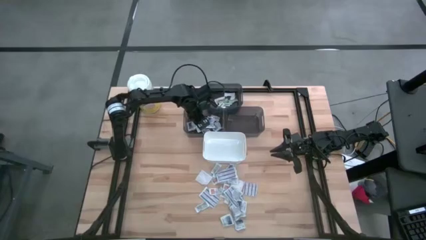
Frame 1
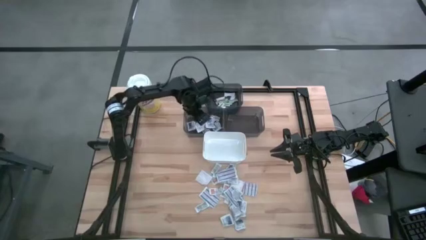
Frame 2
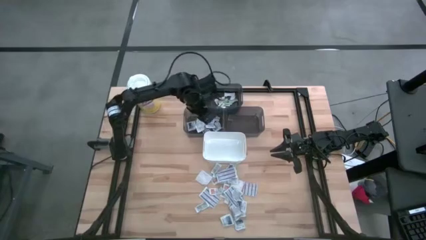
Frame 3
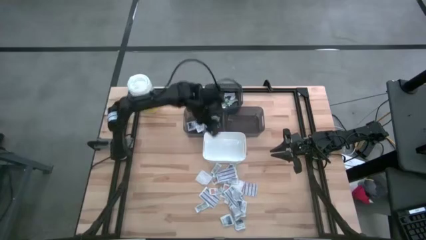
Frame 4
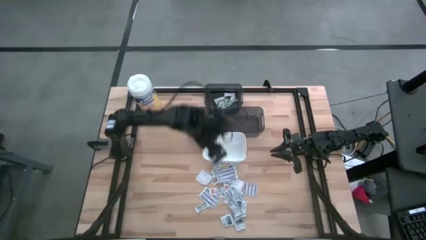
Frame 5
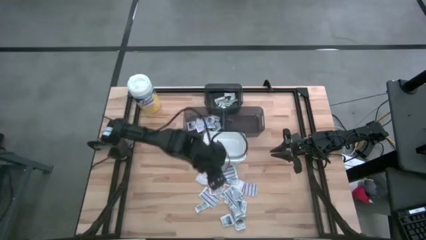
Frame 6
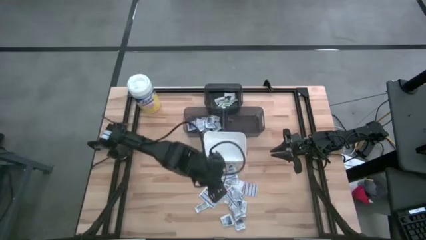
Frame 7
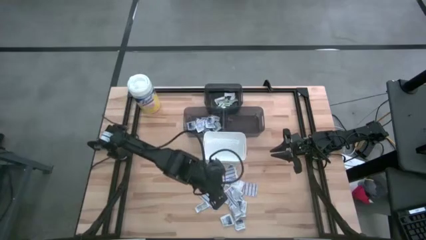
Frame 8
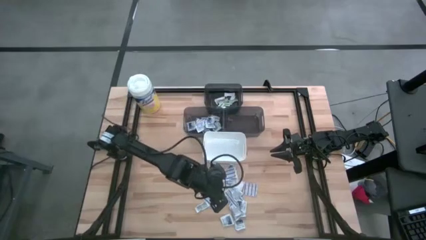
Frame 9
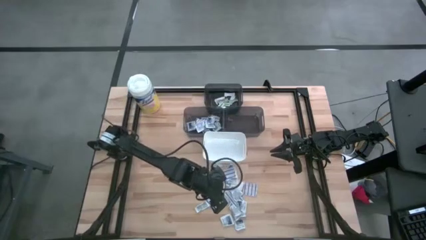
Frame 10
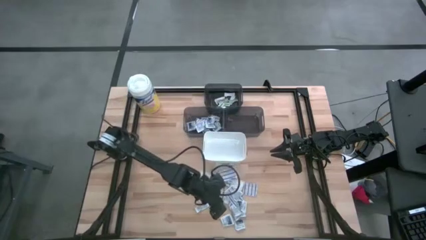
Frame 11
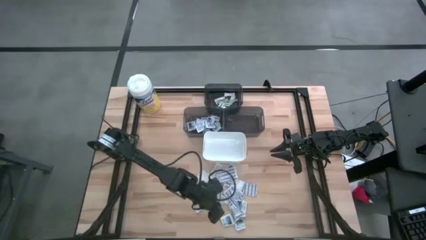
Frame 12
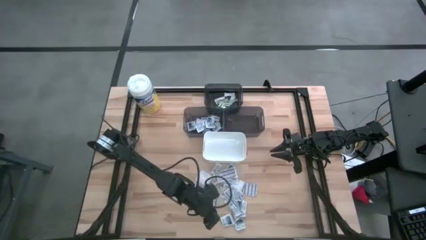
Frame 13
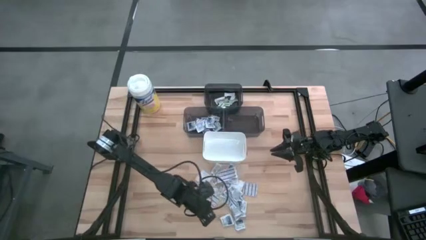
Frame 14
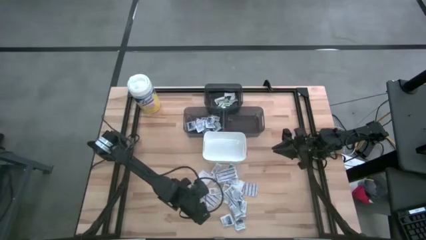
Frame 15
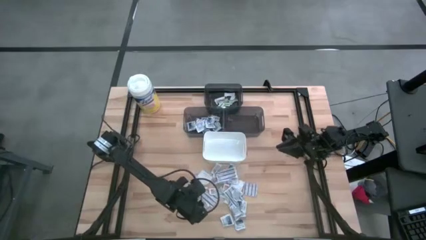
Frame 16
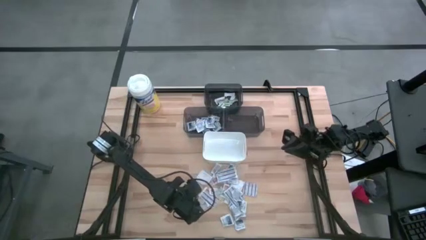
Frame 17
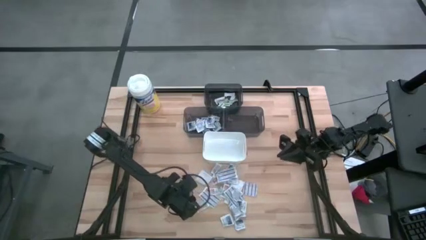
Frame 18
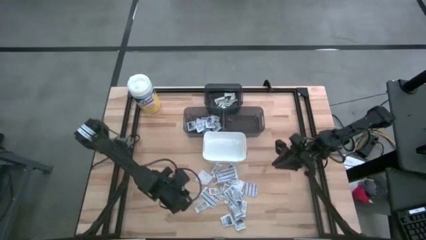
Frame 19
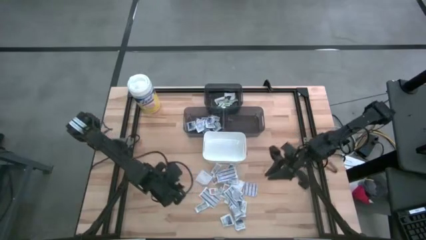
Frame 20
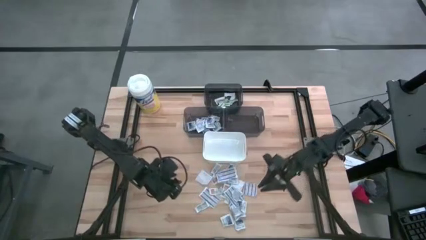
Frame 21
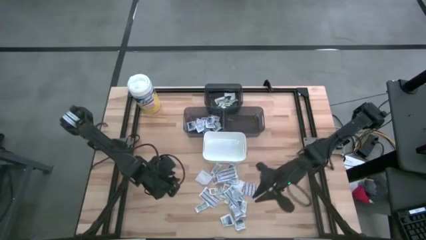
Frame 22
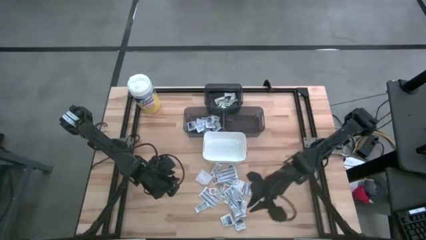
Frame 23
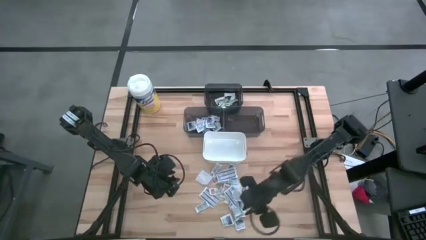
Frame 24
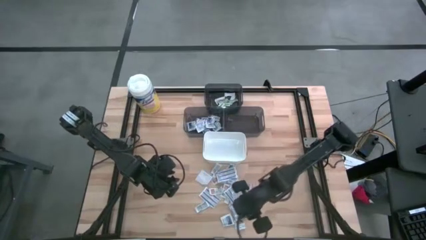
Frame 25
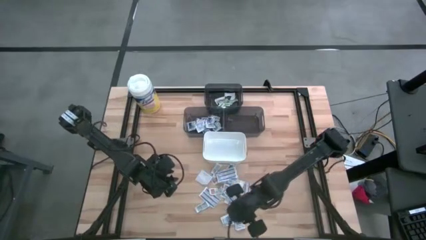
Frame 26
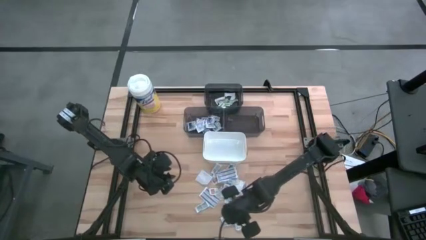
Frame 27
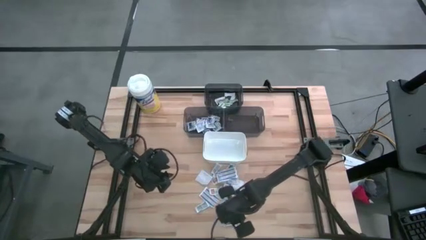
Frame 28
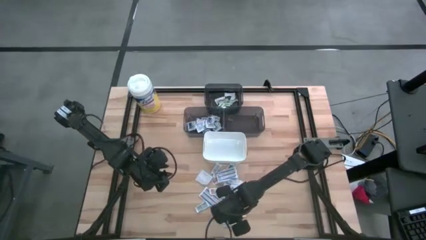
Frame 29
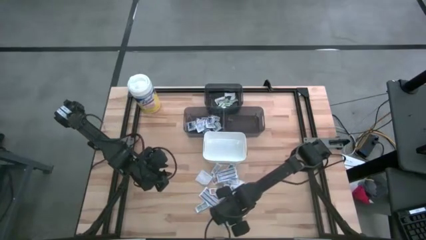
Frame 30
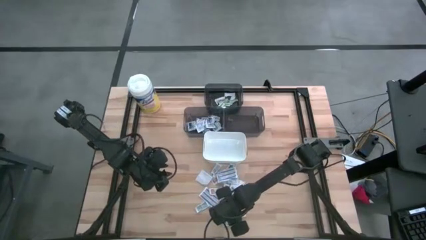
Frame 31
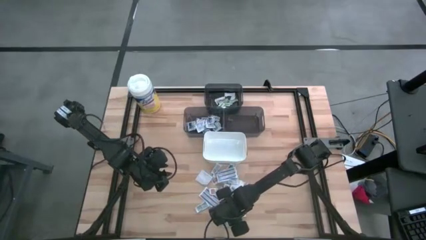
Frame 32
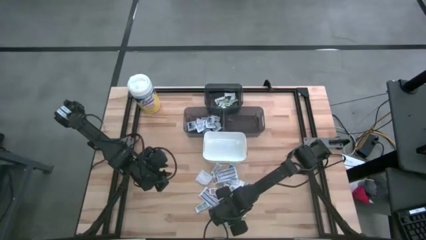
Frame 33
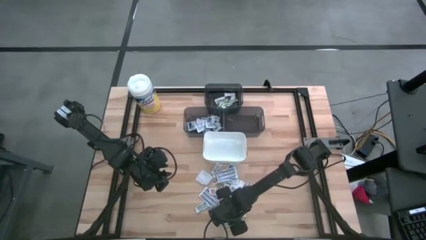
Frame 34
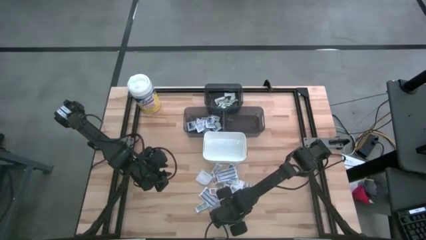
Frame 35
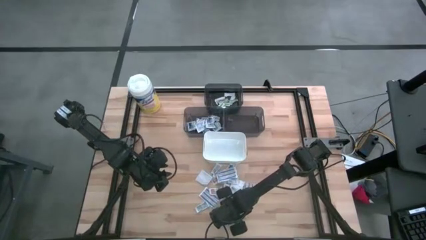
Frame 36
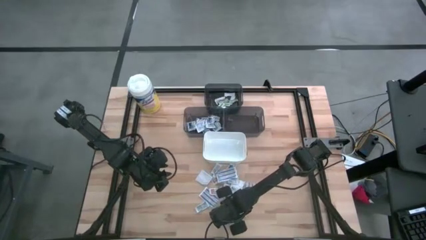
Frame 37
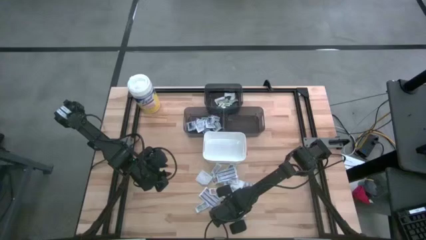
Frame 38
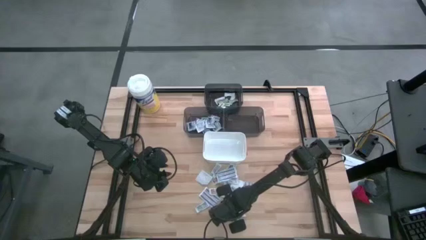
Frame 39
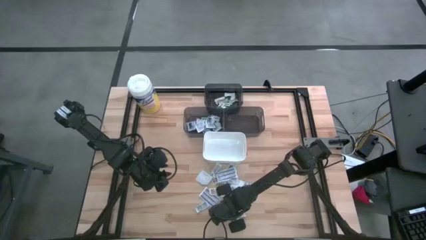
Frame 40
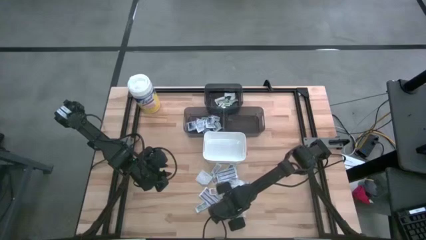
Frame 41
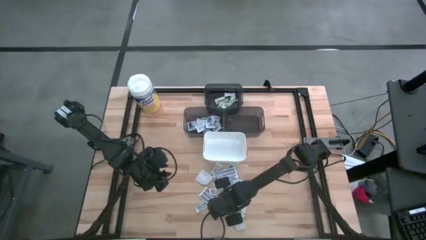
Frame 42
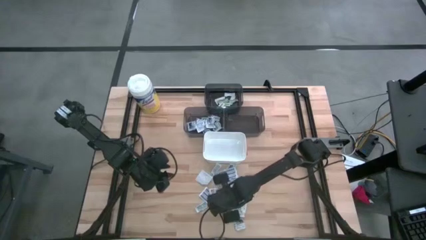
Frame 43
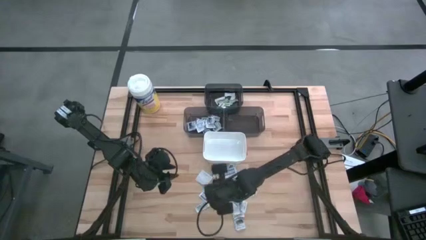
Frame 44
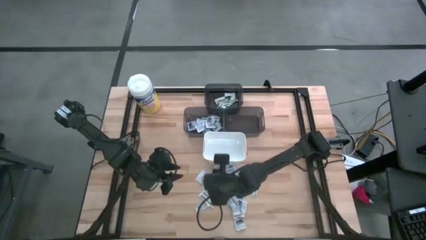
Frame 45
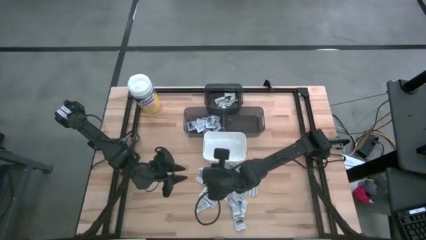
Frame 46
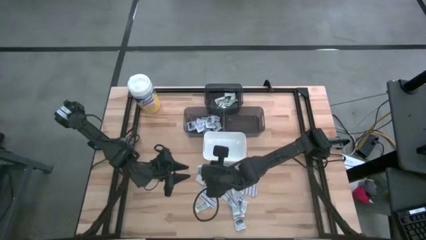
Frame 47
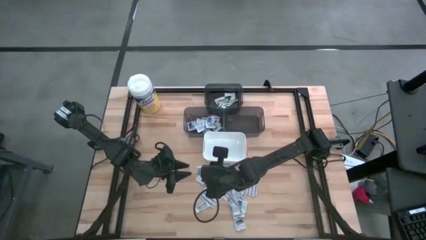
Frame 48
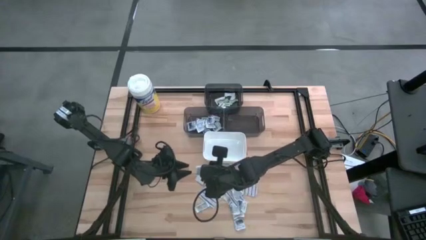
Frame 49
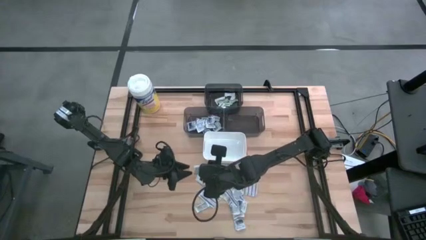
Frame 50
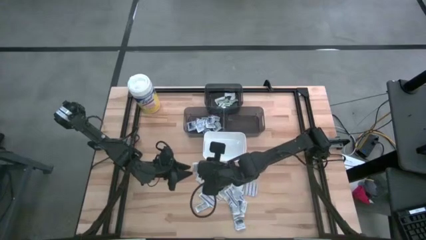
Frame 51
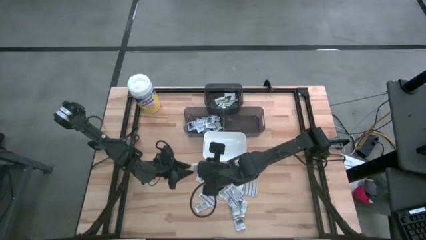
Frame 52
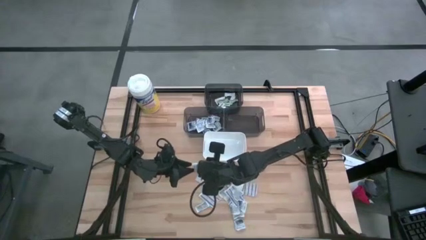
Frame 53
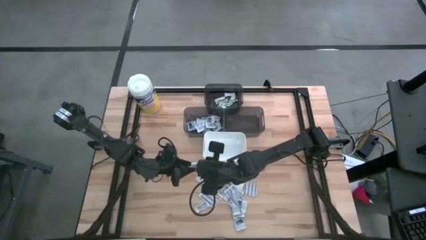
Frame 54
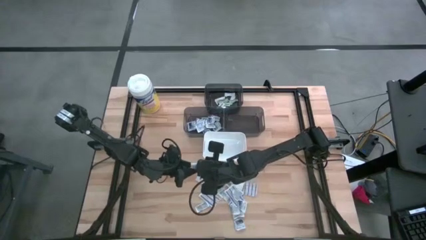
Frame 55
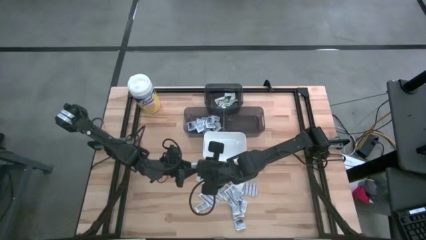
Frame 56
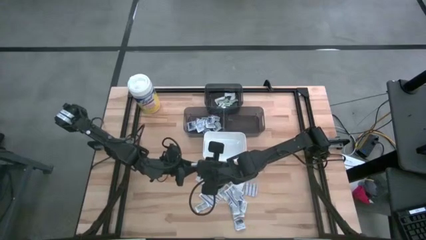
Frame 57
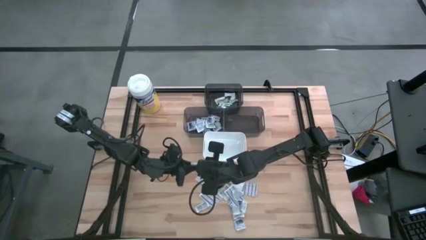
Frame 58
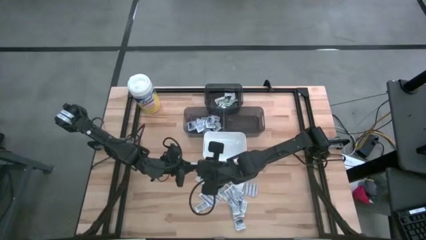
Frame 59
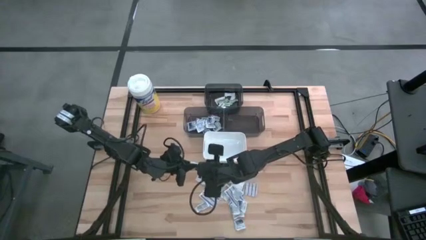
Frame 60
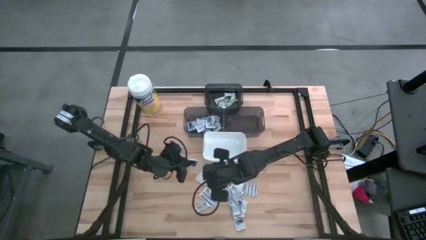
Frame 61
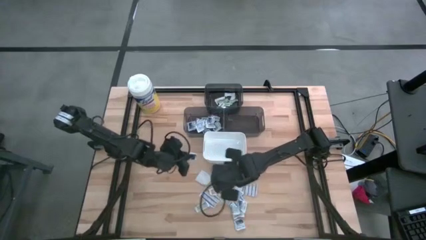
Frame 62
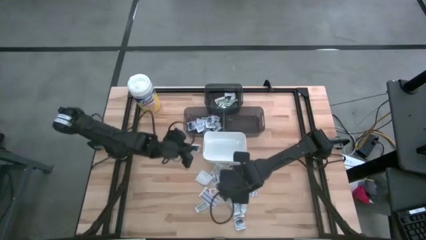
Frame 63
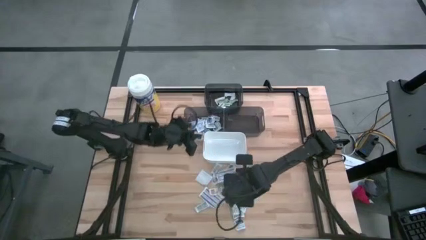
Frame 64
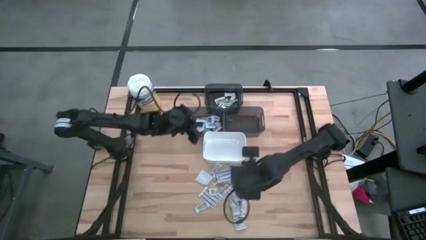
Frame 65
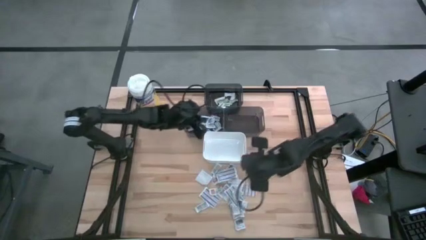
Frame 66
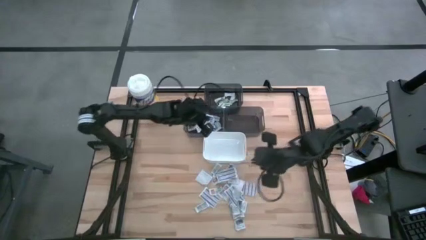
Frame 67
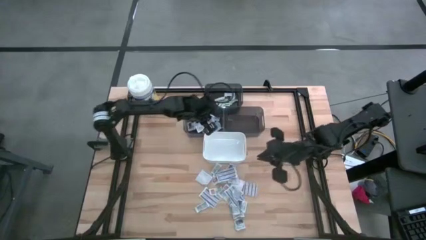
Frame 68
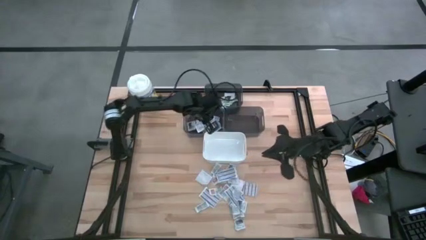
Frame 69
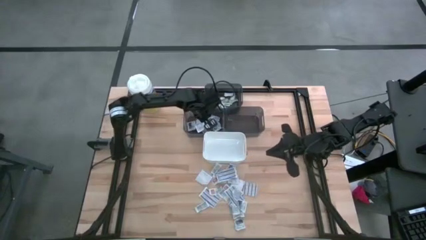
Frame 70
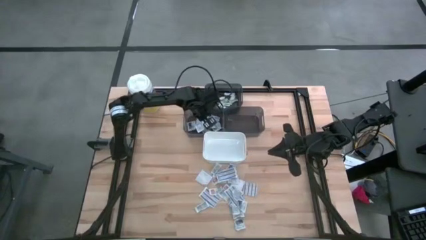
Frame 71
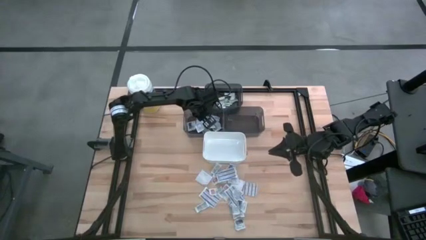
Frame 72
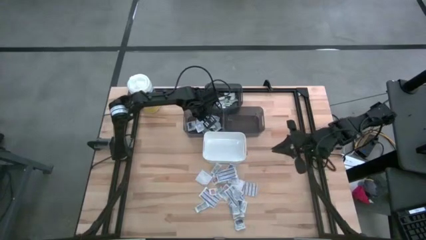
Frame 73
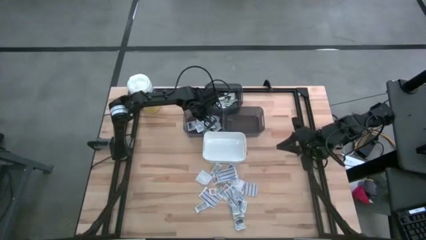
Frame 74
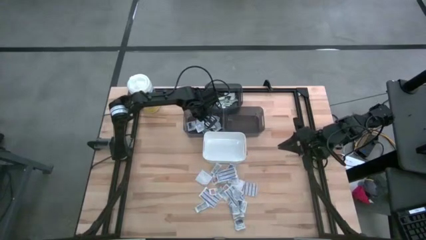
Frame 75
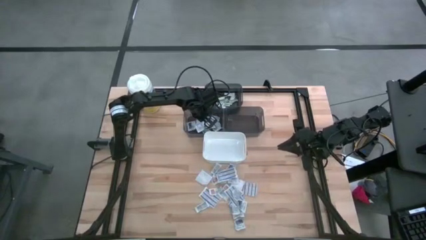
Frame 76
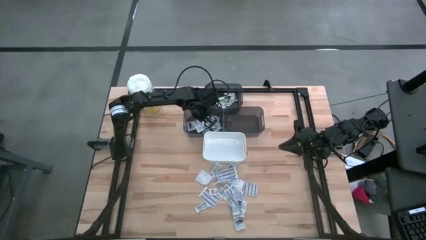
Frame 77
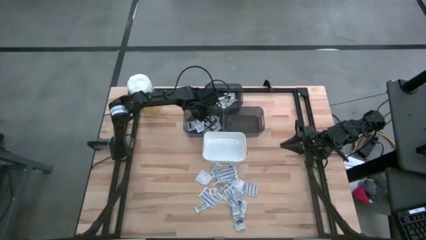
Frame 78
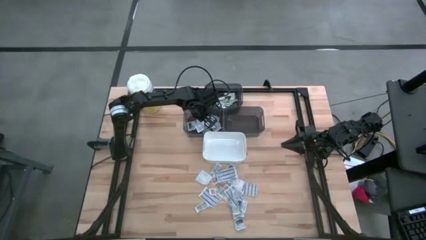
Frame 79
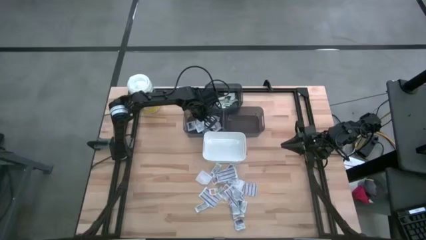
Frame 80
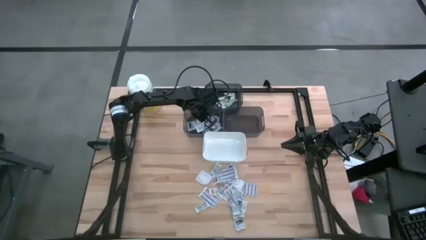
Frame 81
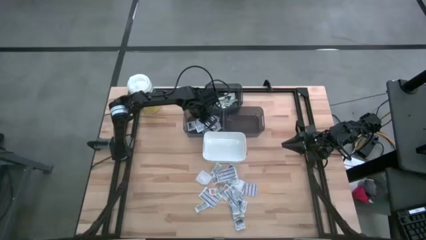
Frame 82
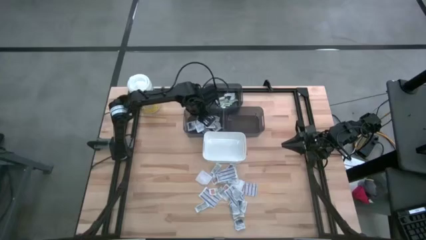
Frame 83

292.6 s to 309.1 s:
Task: Pick & Place First Aid Supplies
Put the alcohol pad into the left black bin
